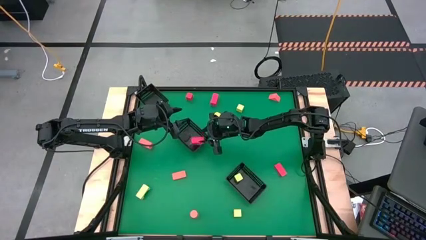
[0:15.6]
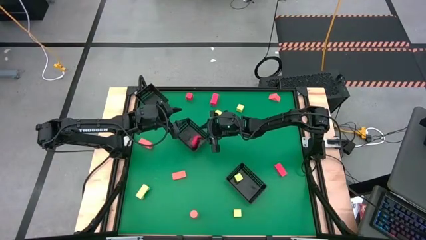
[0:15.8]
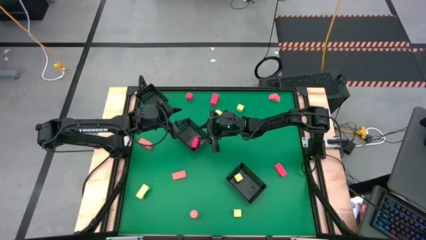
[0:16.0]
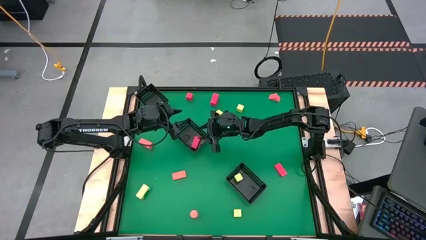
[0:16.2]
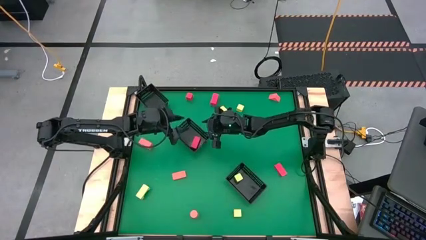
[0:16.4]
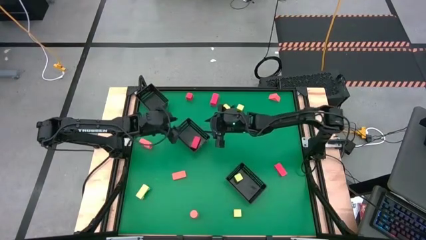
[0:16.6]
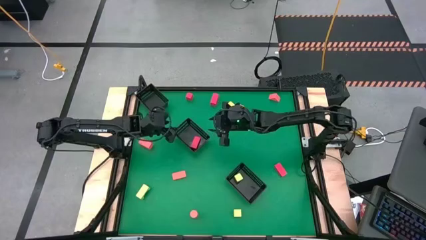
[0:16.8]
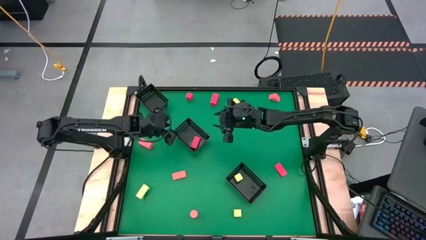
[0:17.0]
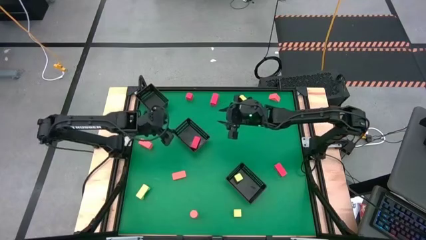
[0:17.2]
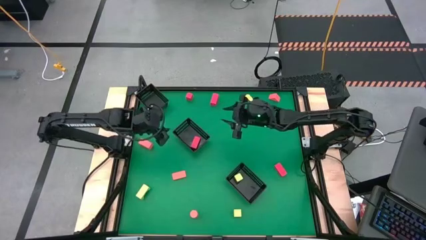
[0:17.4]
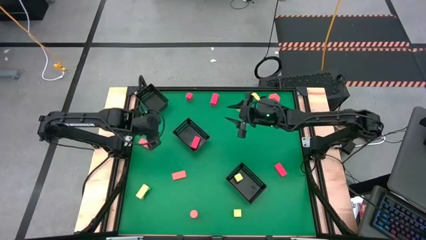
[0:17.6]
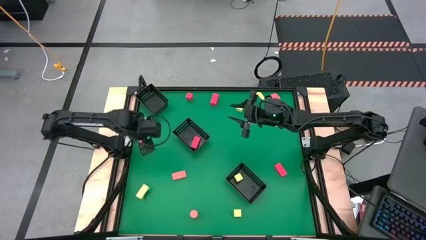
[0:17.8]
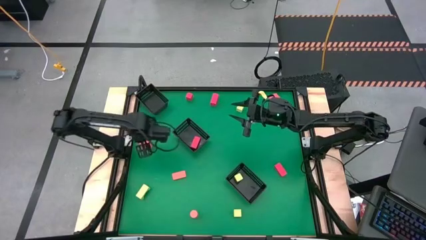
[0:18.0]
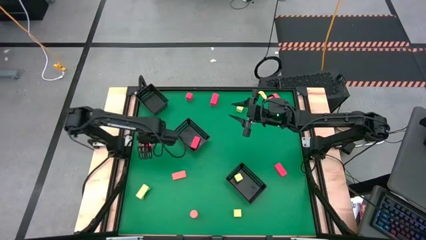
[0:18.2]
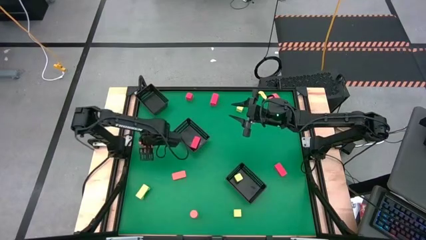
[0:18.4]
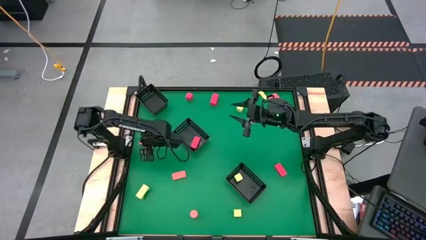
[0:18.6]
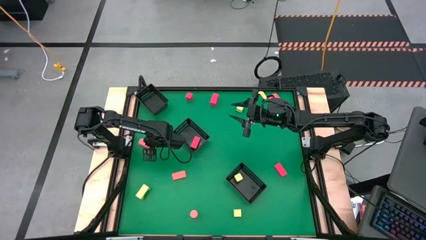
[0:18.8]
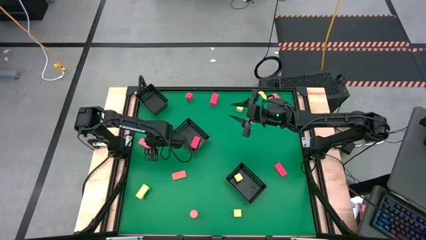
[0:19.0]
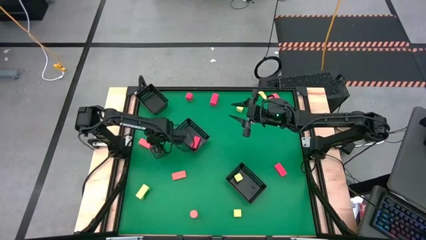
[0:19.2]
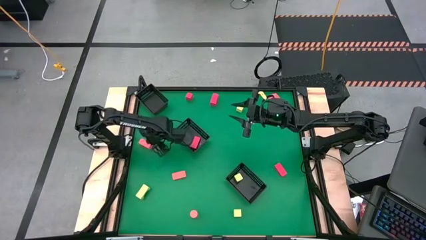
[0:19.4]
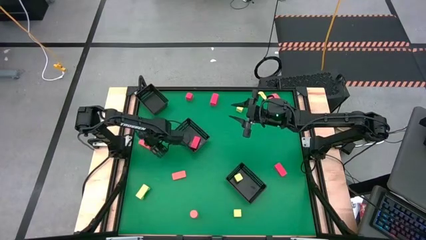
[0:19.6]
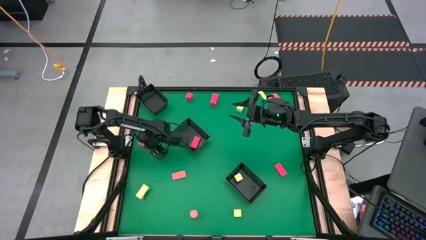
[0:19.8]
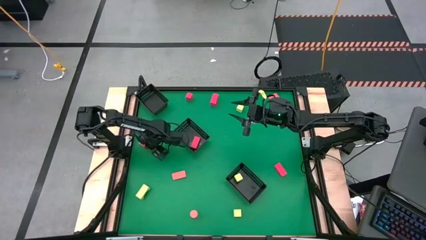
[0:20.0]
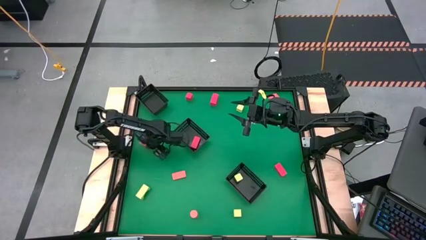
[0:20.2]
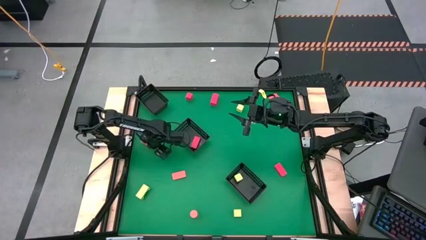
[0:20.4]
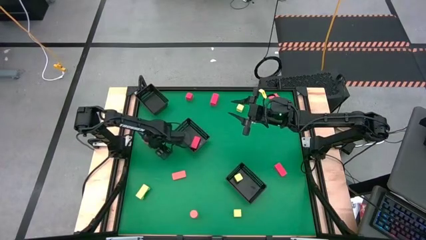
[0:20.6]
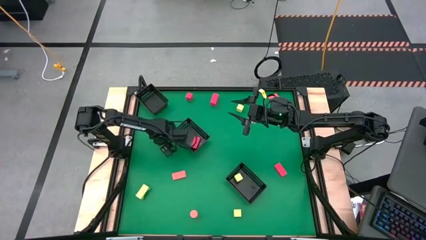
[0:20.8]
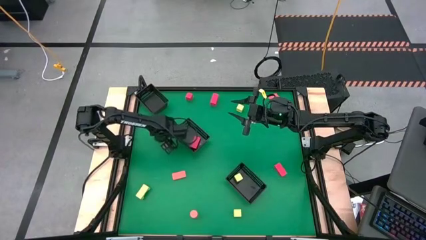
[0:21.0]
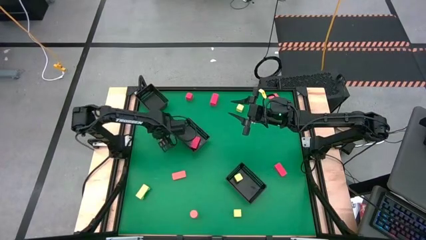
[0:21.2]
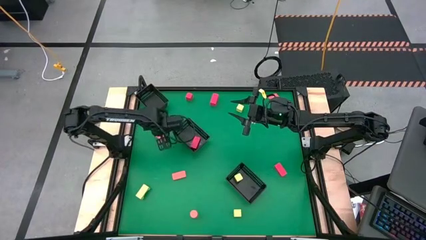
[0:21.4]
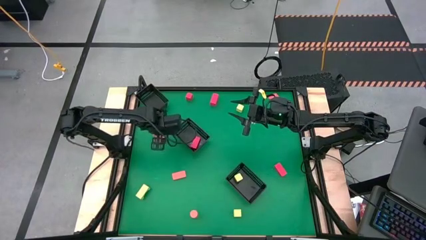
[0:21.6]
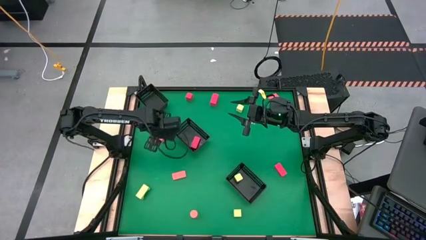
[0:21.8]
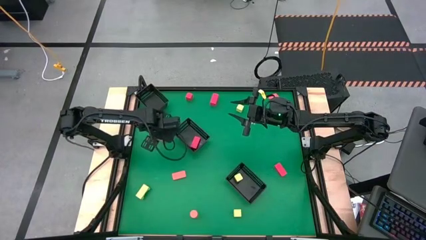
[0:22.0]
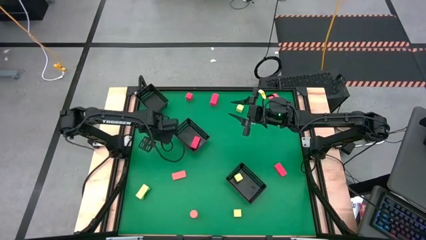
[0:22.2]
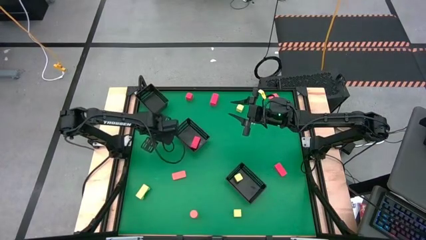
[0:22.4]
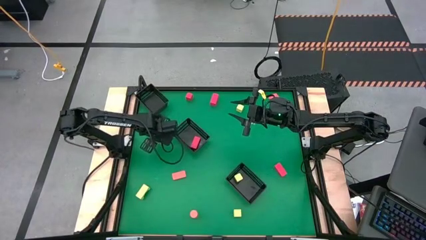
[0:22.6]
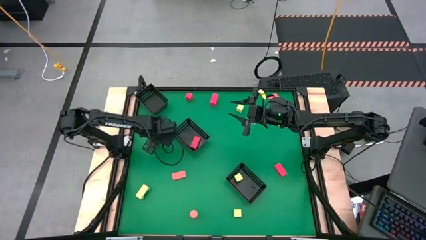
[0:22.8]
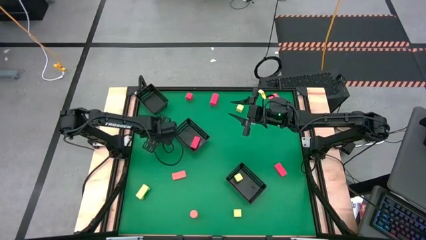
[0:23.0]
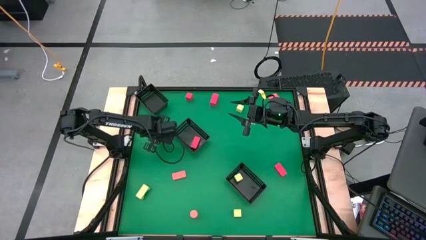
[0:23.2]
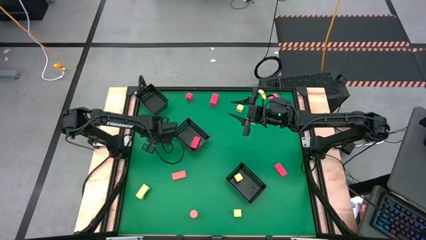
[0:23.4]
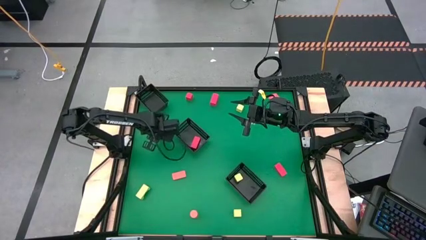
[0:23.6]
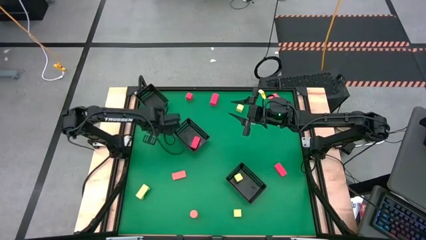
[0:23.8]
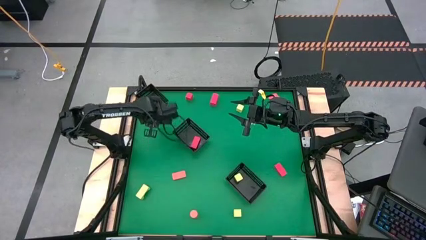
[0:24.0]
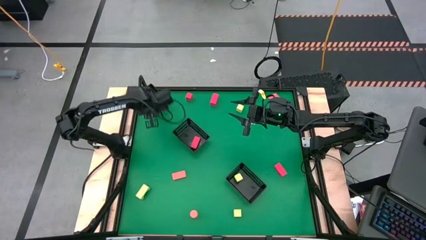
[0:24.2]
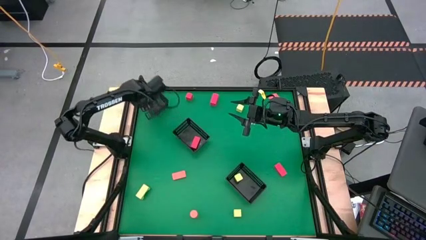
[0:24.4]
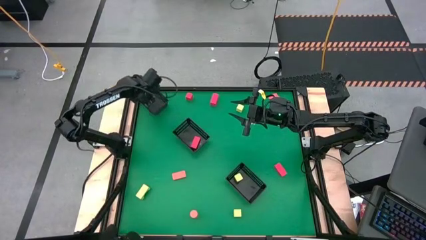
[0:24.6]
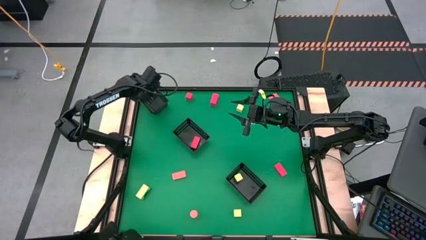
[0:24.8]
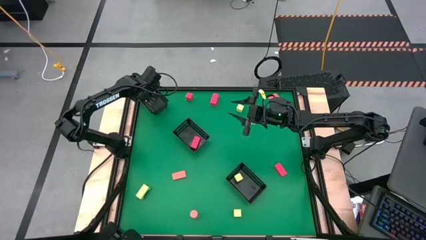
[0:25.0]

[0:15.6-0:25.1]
Task: Sort & place blocks by color
Put the light orange block into the top black bin

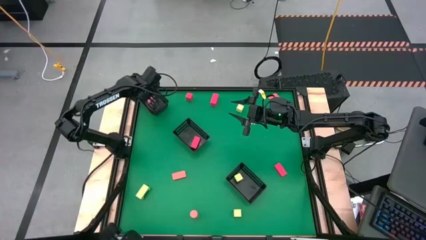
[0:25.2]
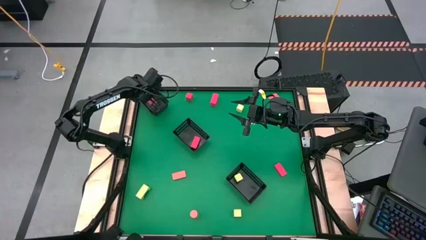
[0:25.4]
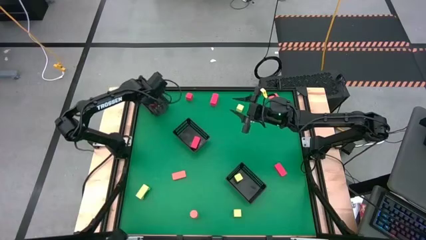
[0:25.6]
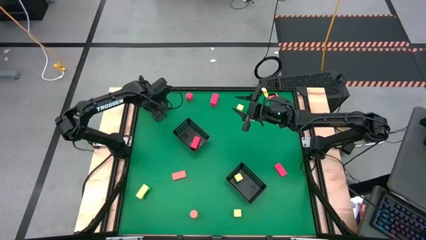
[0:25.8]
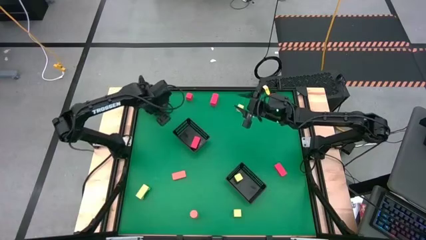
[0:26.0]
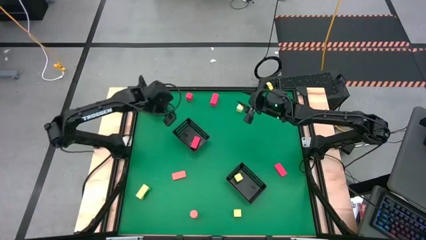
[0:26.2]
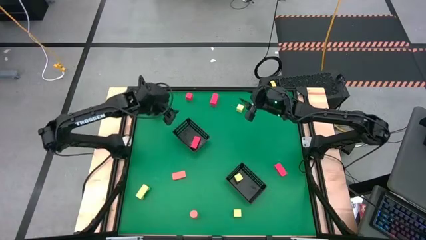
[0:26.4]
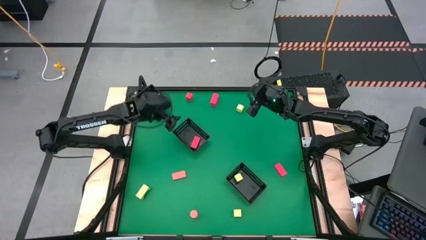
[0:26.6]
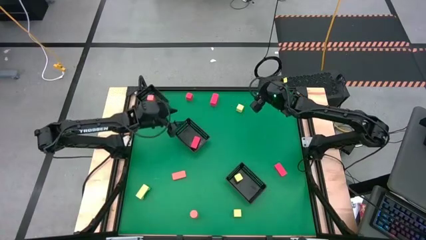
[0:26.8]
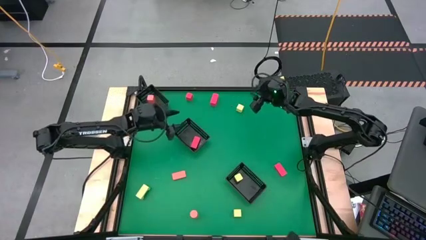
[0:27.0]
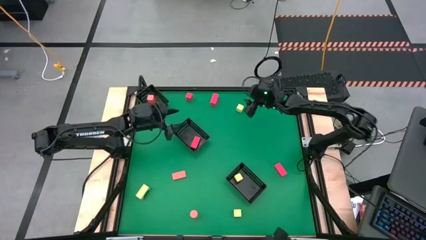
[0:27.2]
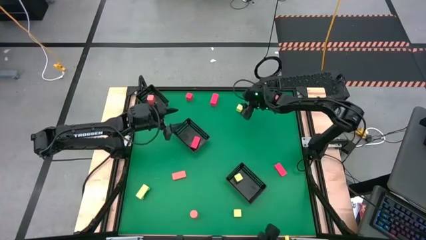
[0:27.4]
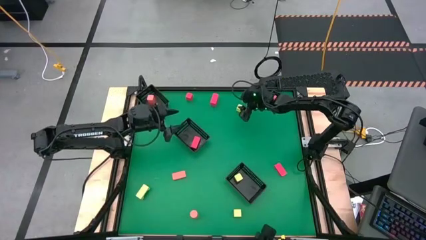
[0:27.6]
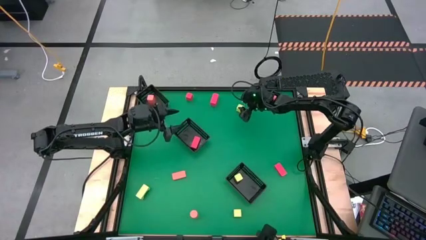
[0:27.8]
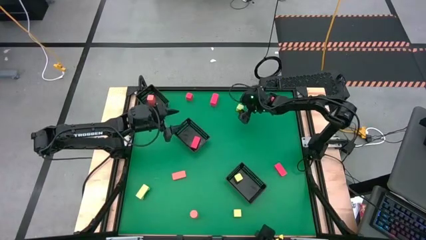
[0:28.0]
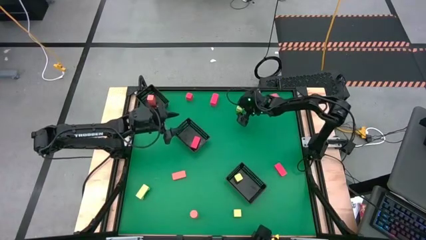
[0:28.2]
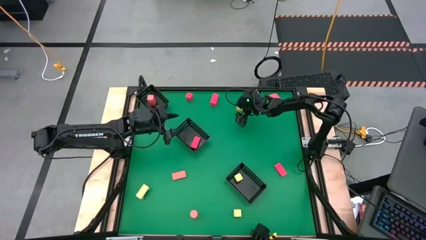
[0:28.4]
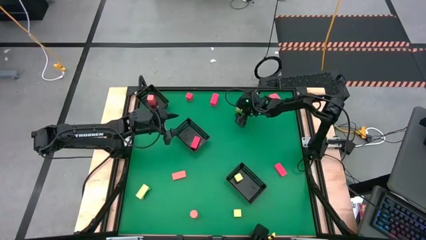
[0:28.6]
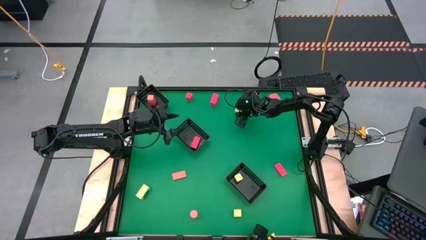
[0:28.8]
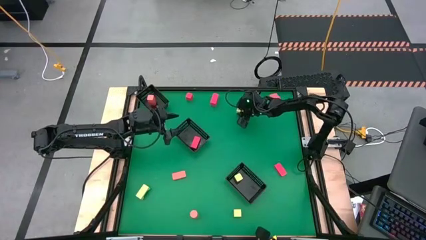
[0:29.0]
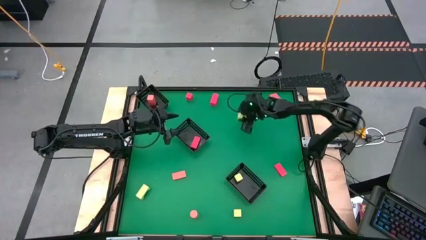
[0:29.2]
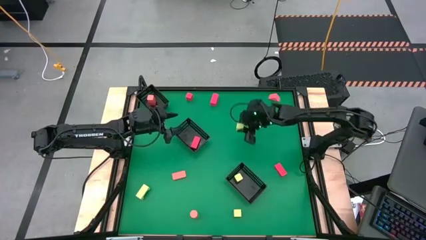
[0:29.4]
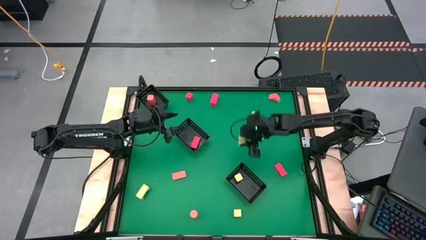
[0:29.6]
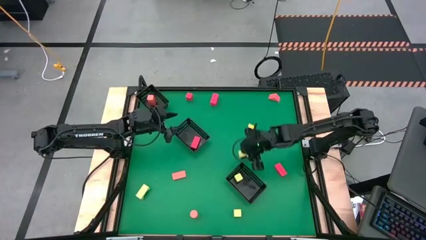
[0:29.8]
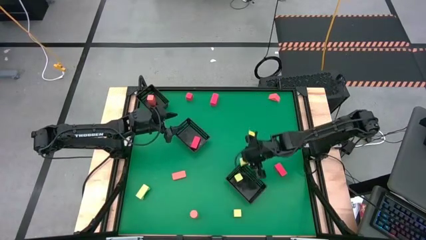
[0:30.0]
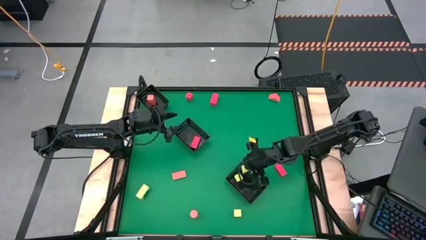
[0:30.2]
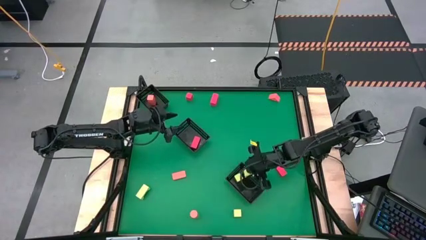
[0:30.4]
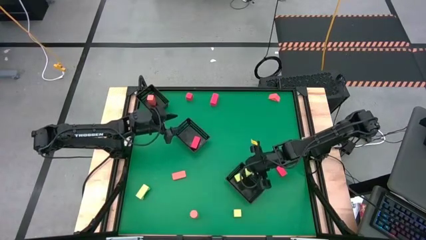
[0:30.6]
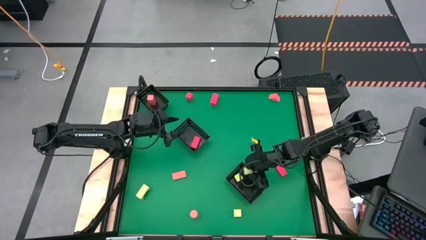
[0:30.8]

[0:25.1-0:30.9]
Put the light green block into the bottom black bin

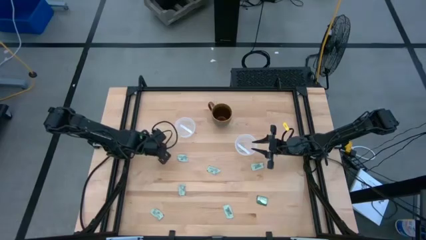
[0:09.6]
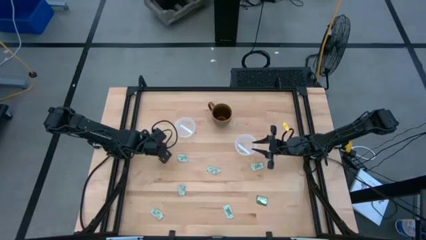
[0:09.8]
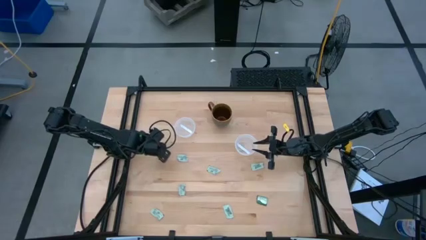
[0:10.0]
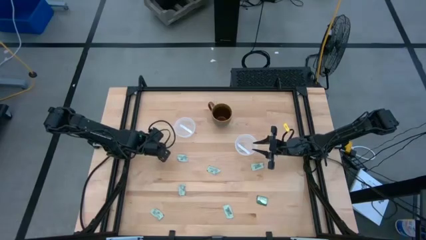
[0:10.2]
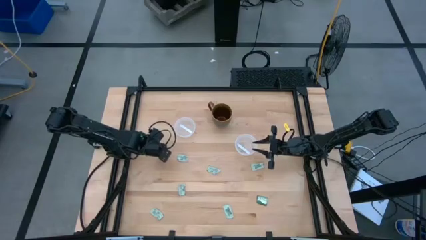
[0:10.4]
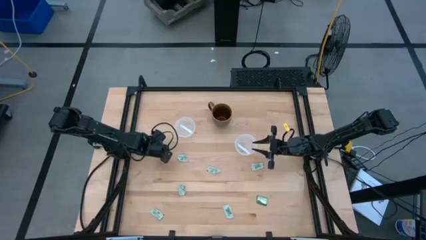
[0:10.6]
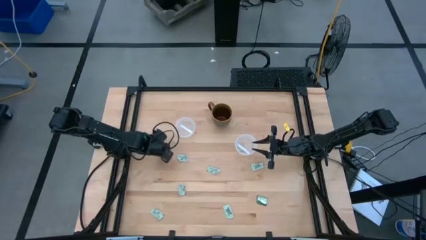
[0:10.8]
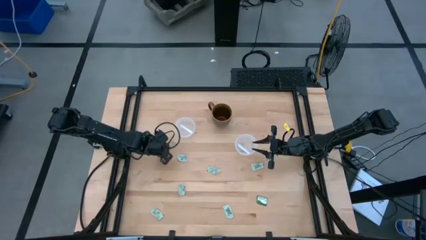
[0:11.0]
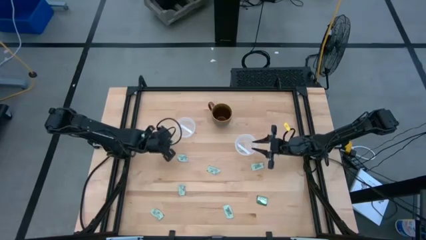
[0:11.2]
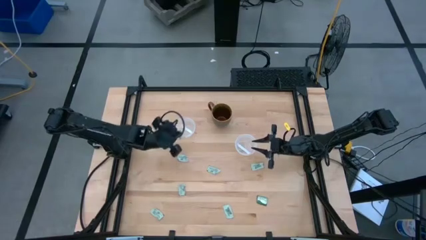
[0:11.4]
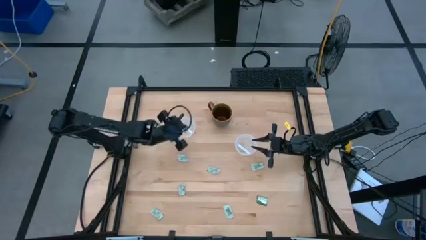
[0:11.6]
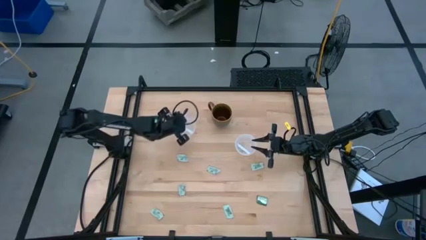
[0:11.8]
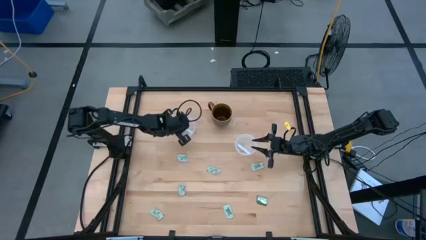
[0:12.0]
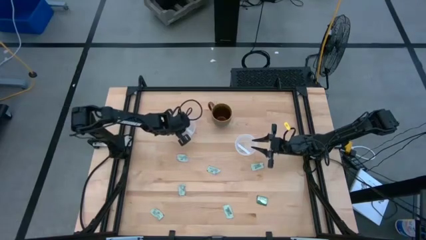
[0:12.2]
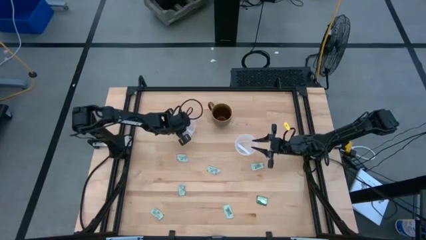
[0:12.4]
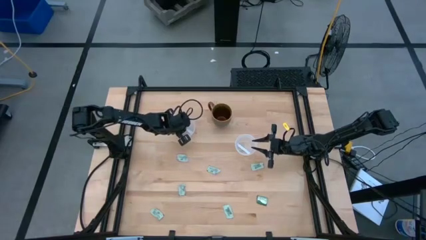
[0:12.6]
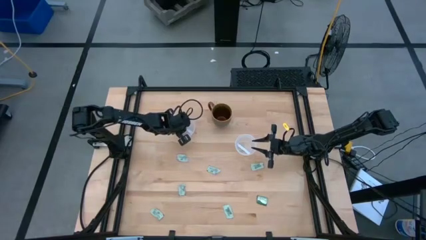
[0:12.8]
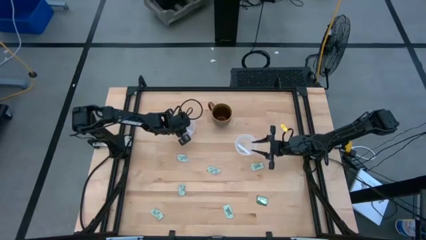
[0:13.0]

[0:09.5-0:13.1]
Task: Pick and place Stevia / Truvia into bins
Put the white stevia packet into the left round transparent container
